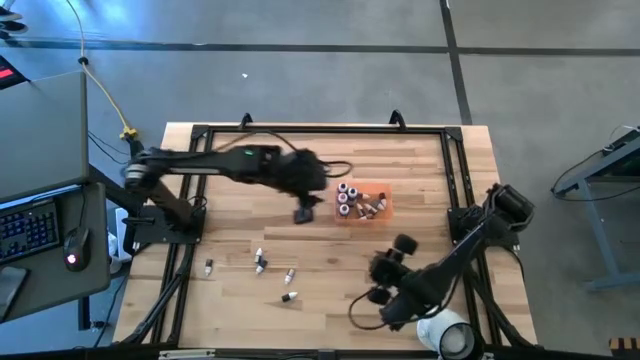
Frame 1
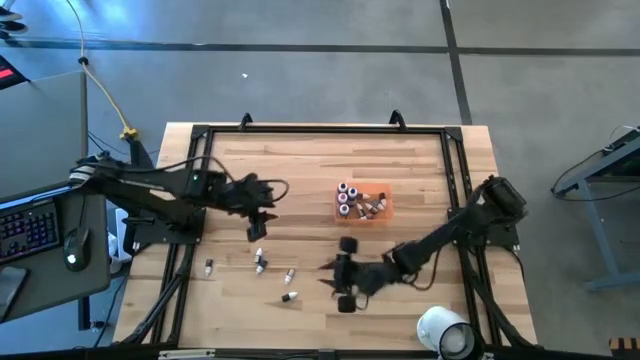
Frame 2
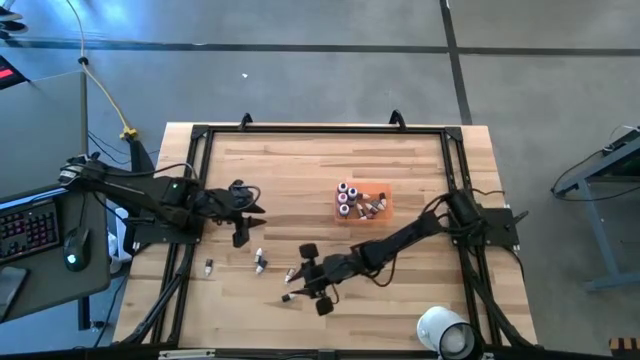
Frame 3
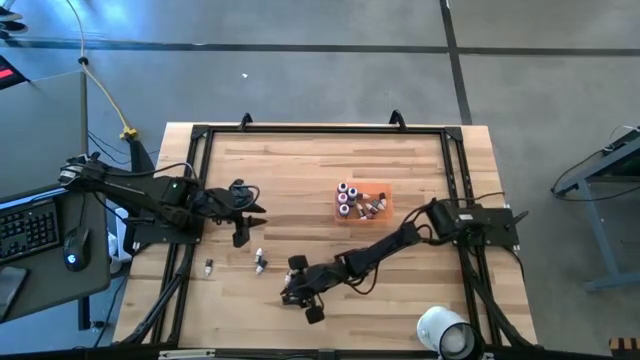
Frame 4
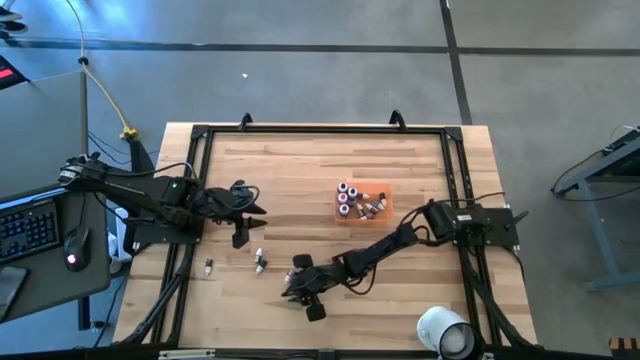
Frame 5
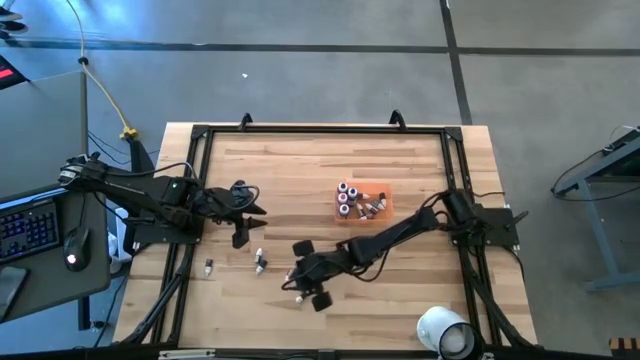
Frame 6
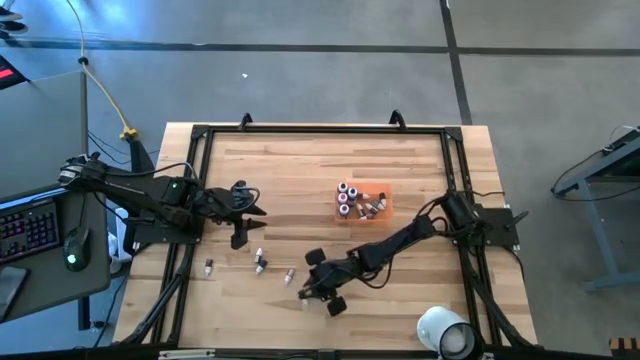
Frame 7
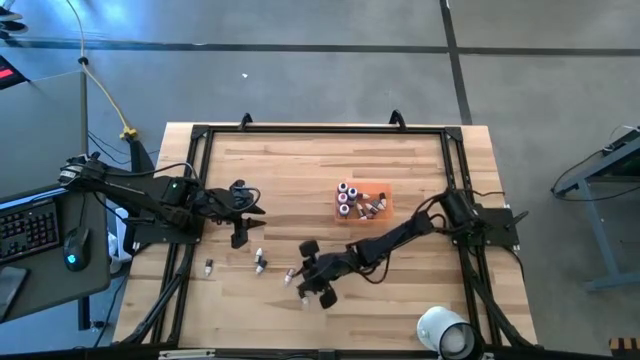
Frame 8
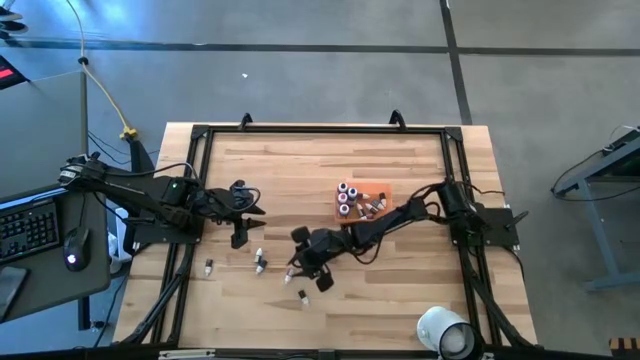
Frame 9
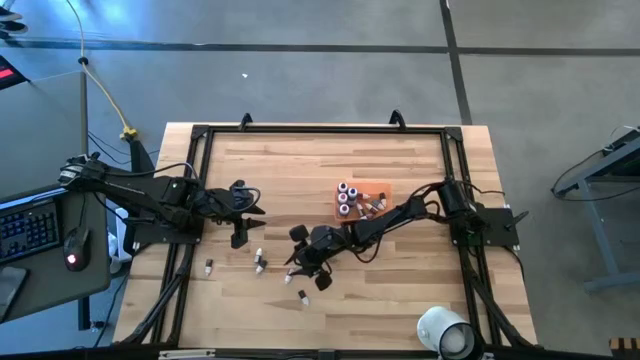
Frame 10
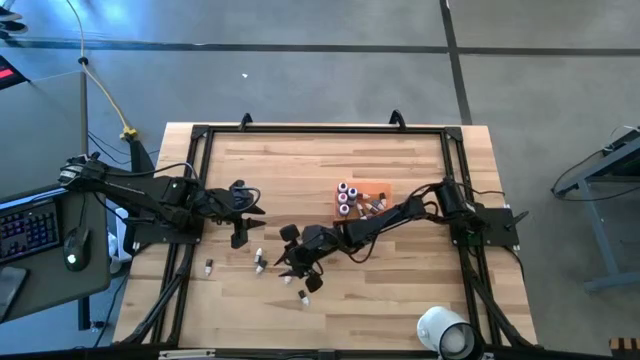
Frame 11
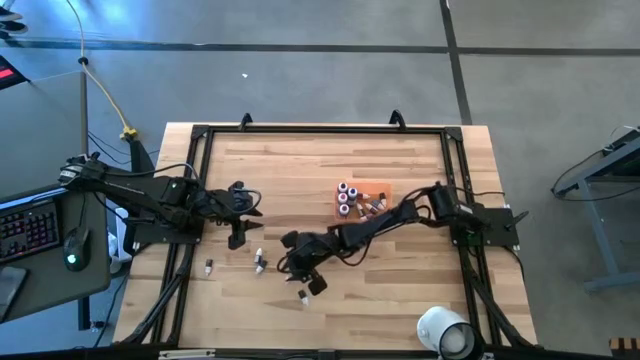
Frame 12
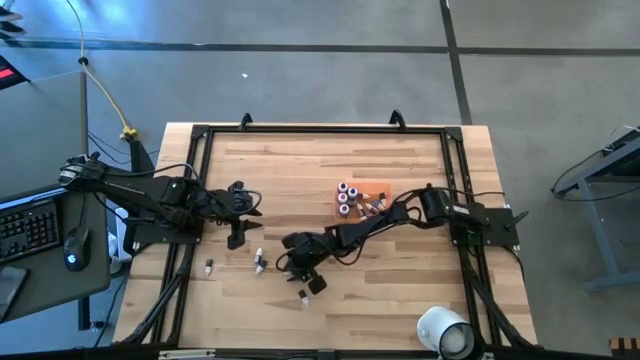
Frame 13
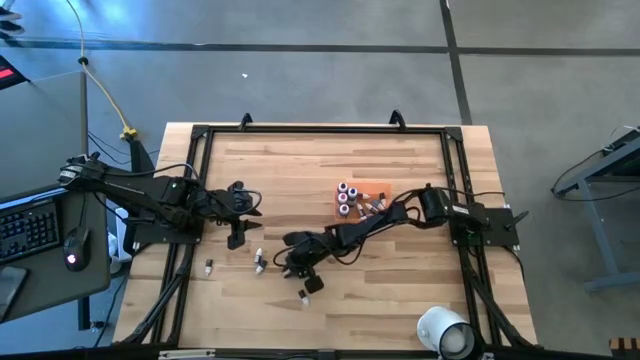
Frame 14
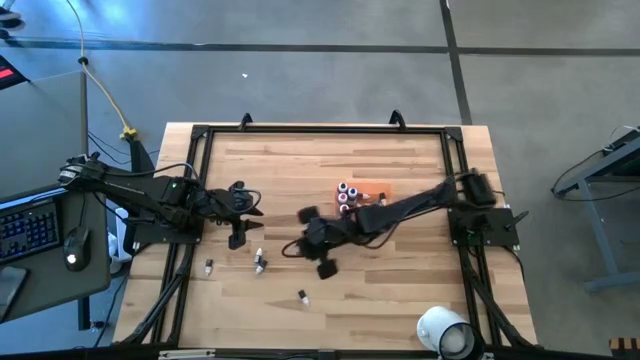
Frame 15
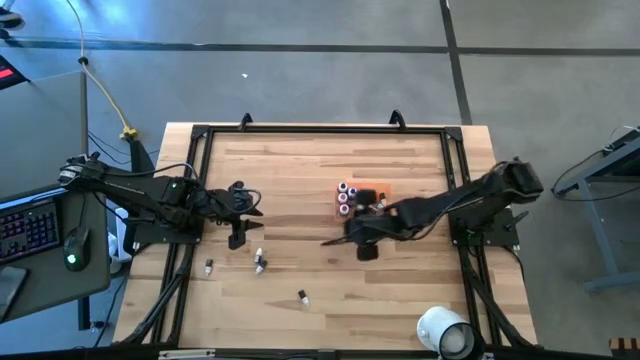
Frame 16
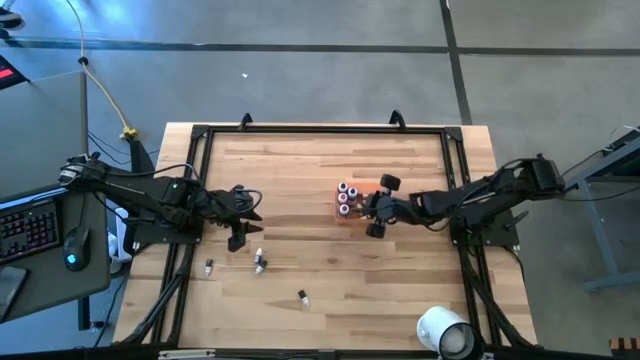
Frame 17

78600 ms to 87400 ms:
Task: Pick & Place food coloring
Put the small orange food coloring bottle into the orange bin

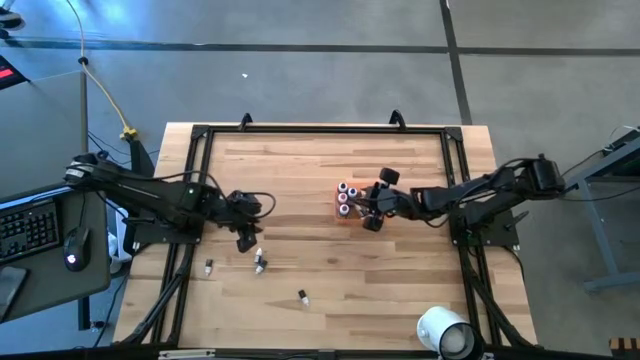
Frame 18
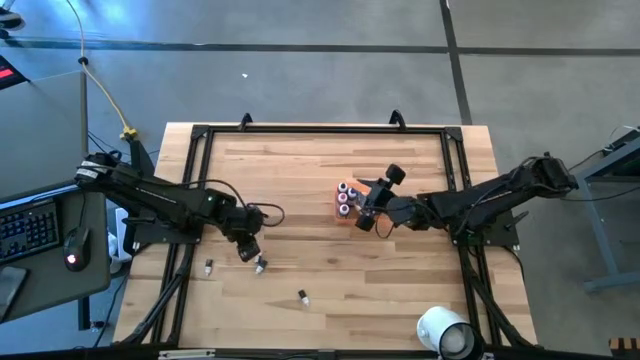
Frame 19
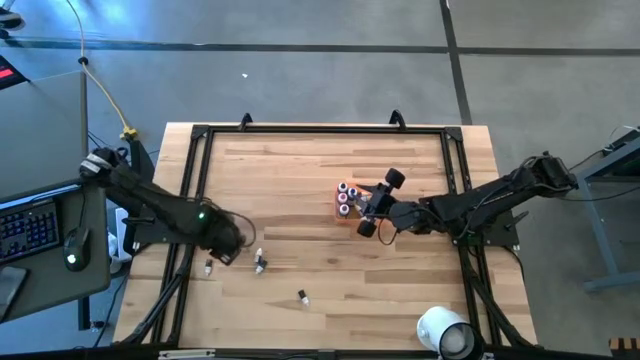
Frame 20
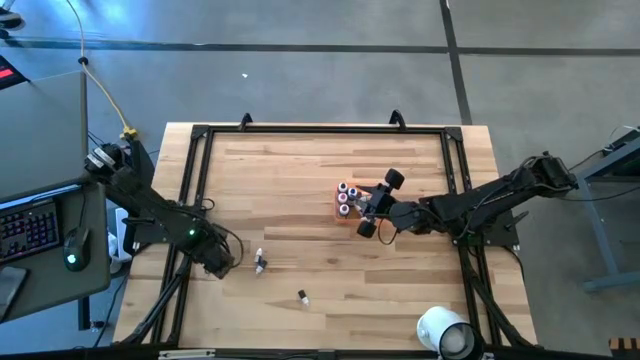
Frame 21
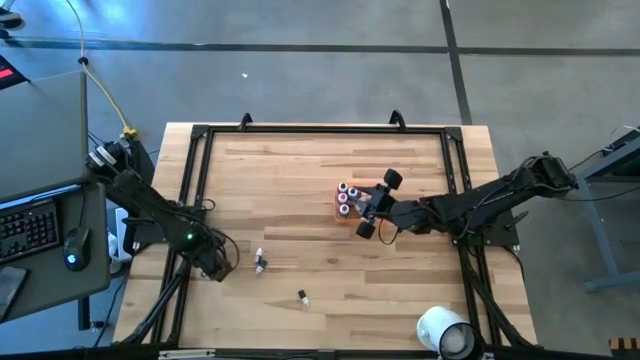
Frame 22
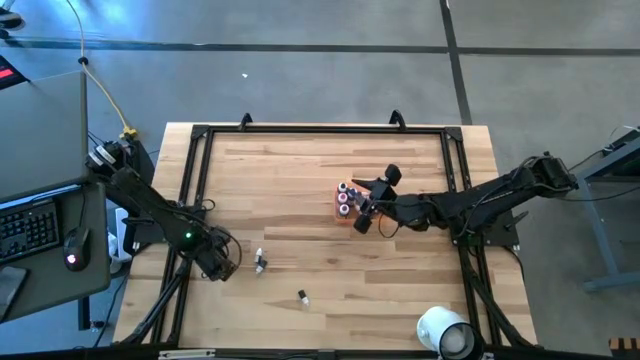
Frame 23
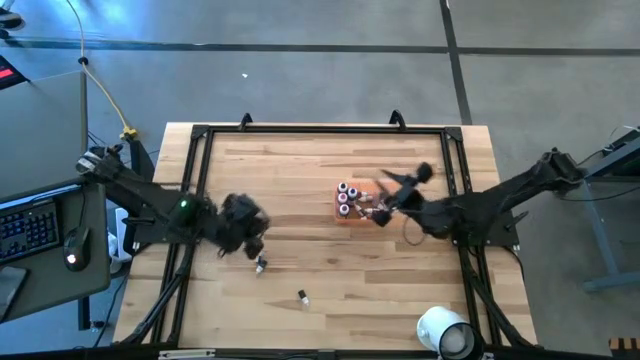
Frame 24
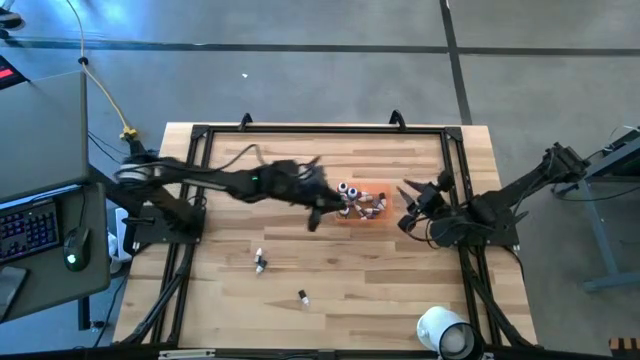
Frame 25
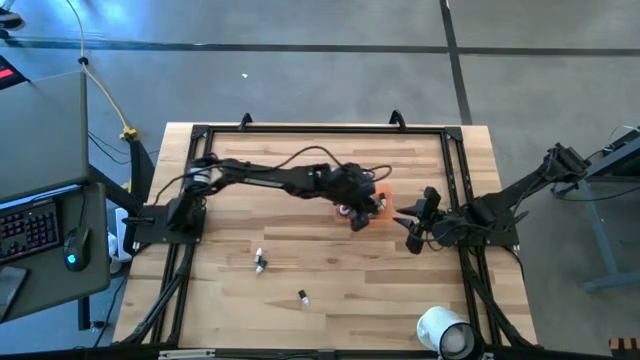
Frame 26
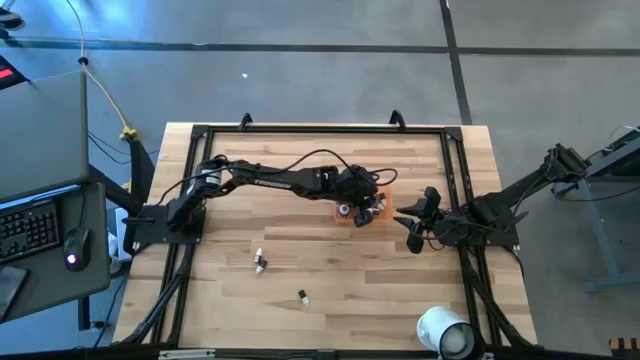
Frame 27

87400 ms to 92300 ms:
Put the small black food coloring bottle into the orange bin

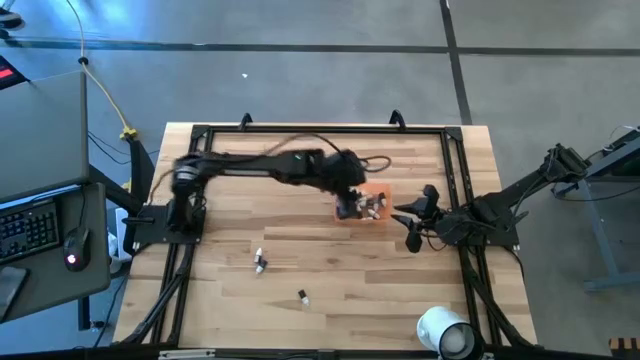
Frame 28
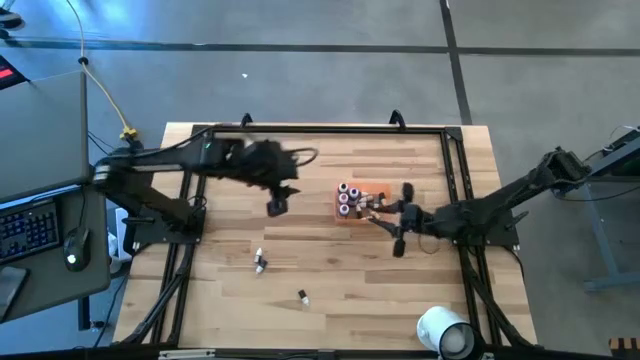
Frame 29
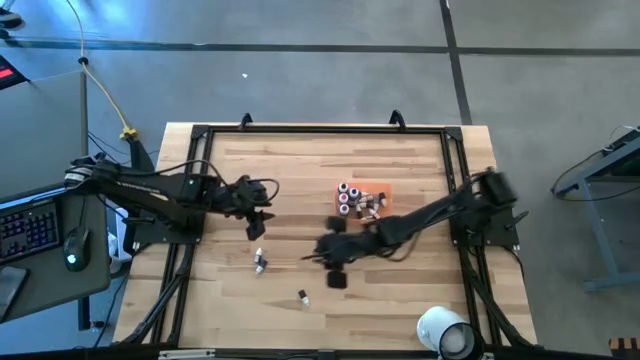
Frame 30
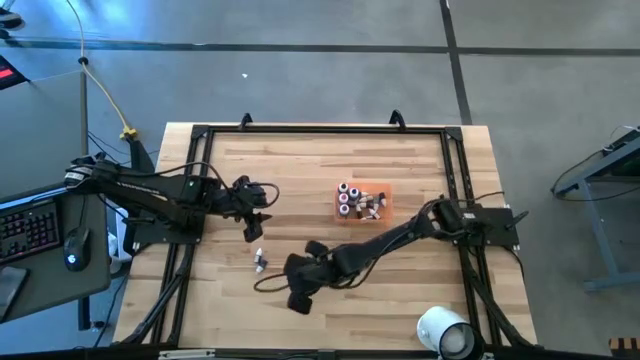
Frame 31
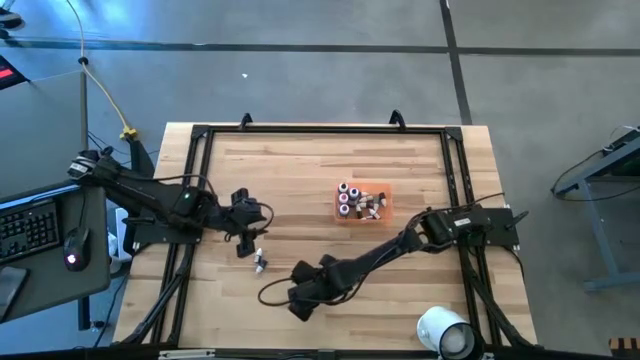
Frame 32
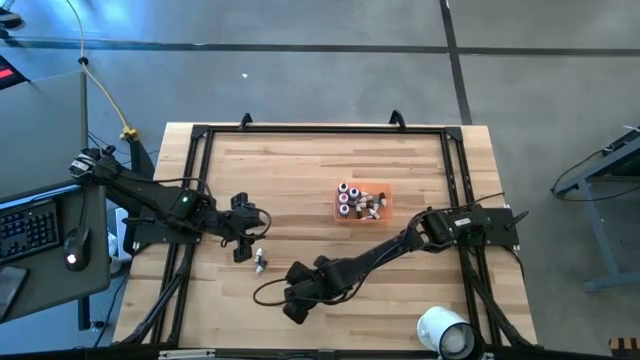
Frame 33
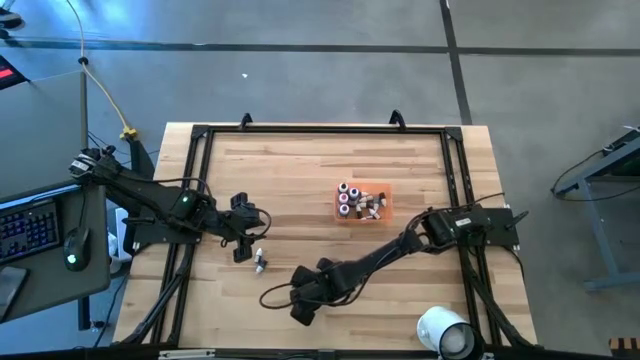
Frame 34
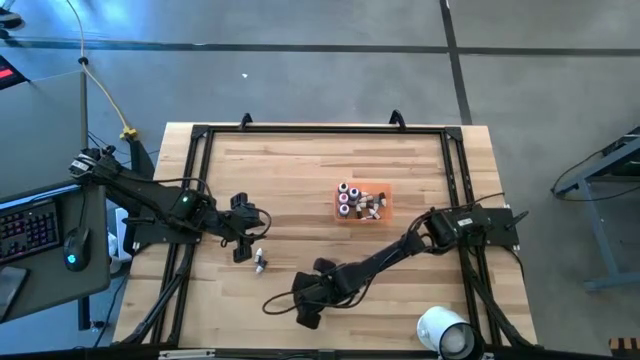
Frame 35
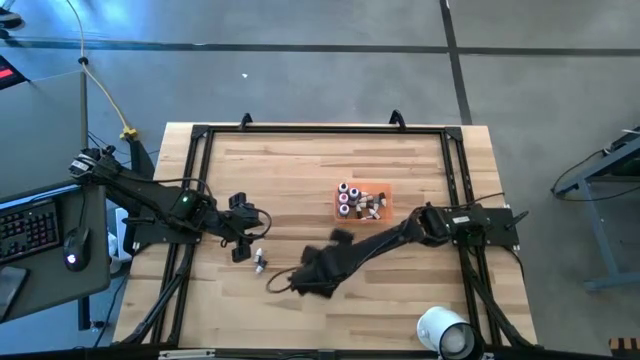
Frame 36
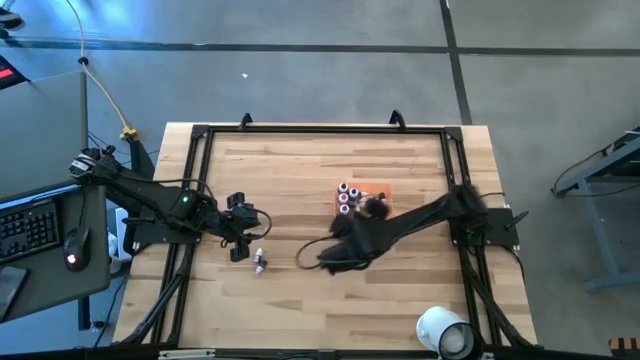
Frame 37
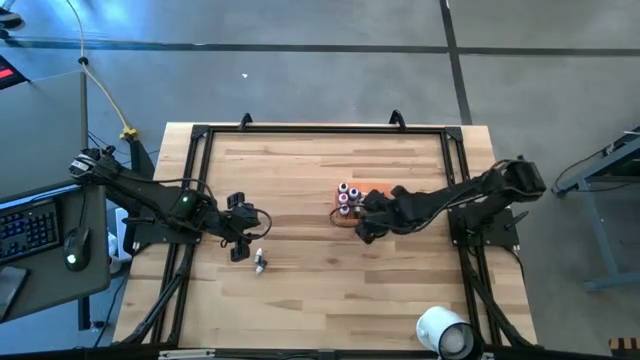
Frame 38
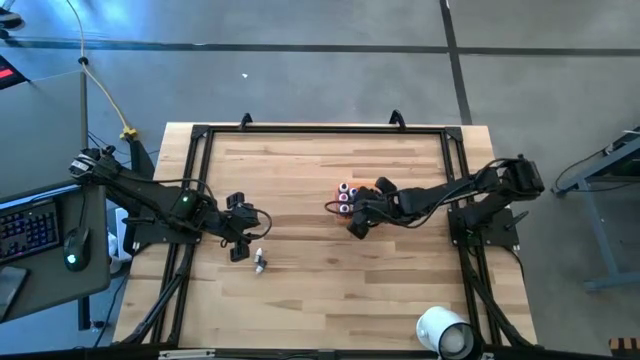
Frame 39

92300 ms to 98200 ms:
Put the small black food coloring bottle into the orange bin

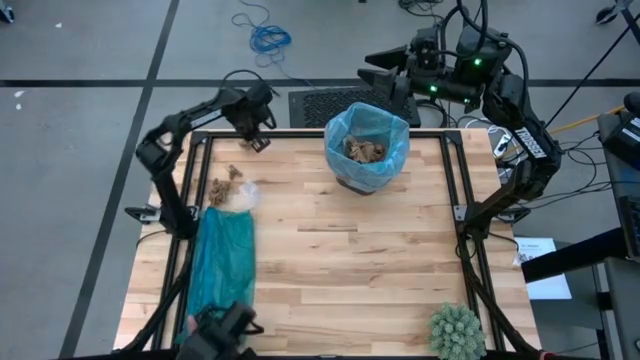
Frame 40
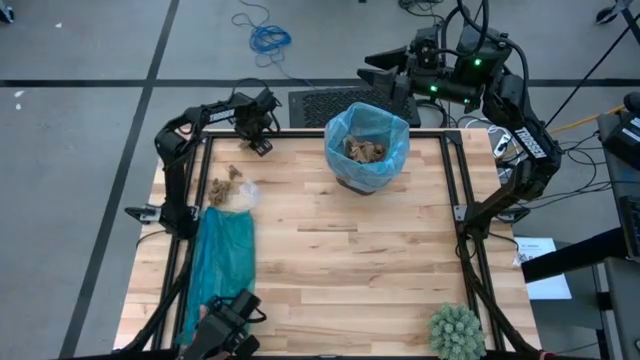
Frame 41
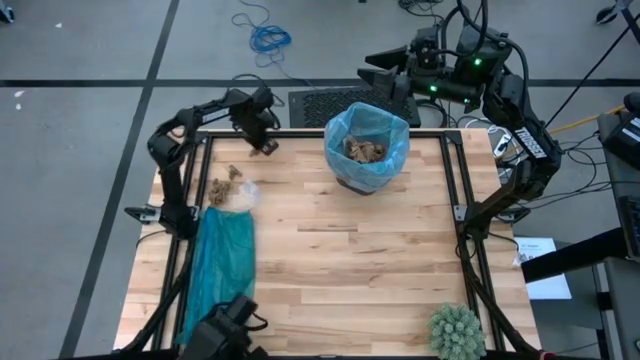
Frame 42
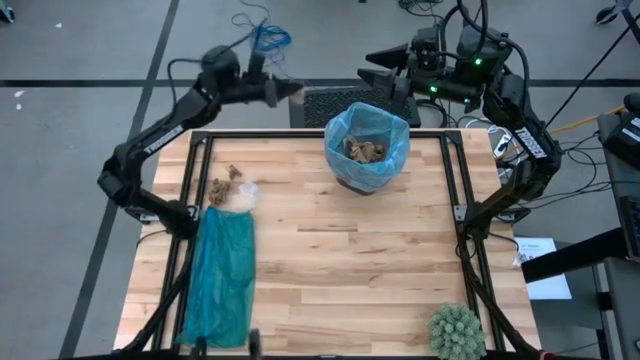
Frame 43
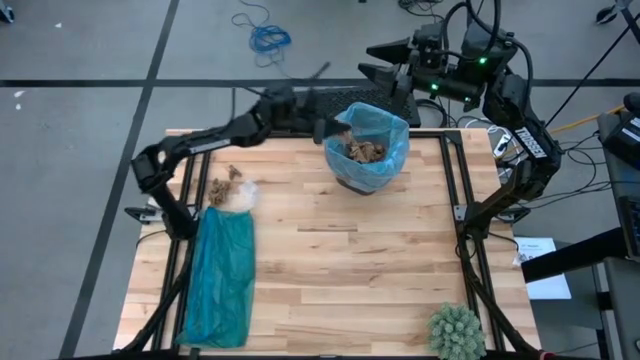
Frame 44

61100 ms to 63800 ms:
Task: place trash/remove bag and relplace
Put the brown napkin into the trash bin
